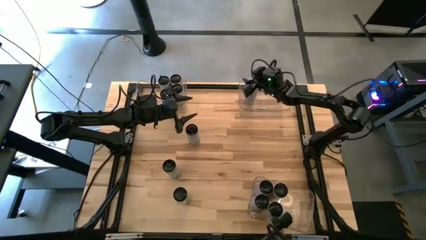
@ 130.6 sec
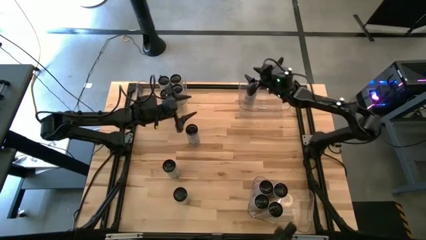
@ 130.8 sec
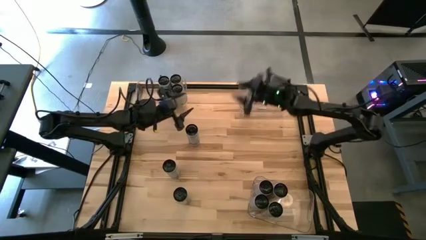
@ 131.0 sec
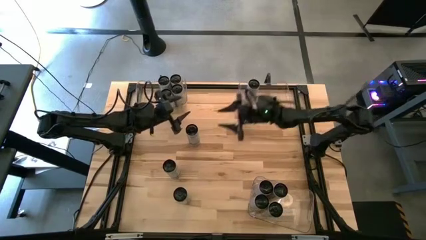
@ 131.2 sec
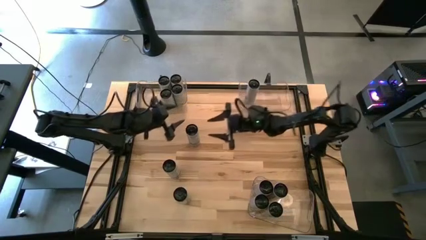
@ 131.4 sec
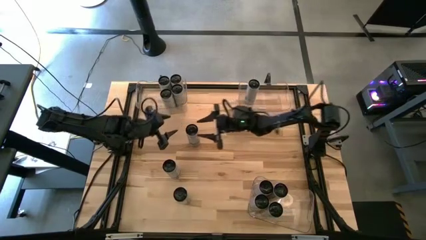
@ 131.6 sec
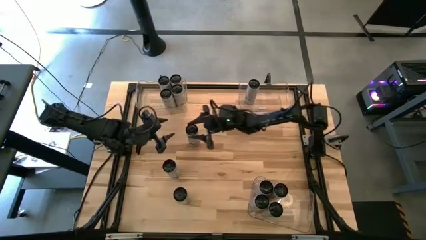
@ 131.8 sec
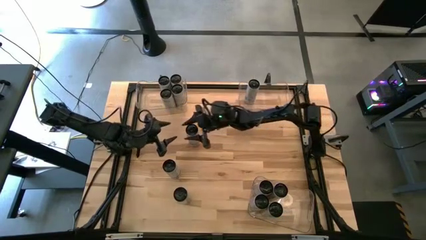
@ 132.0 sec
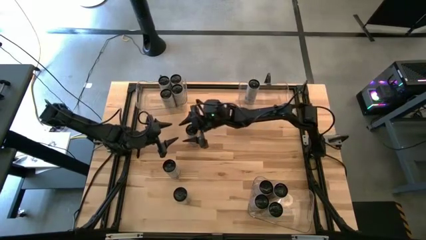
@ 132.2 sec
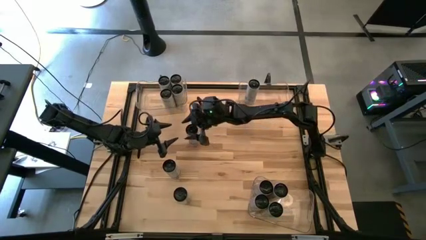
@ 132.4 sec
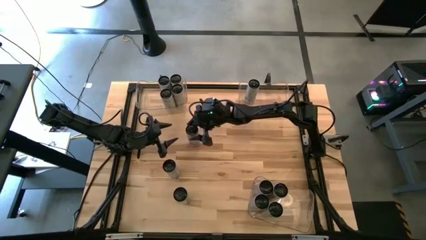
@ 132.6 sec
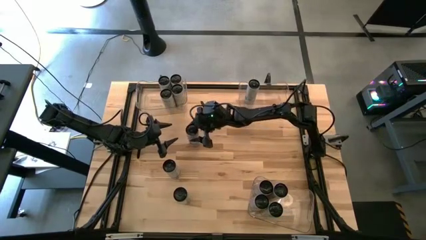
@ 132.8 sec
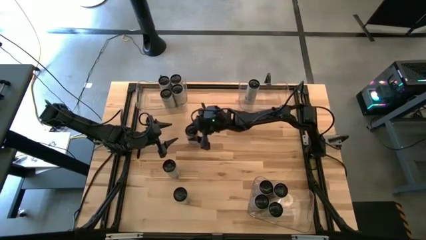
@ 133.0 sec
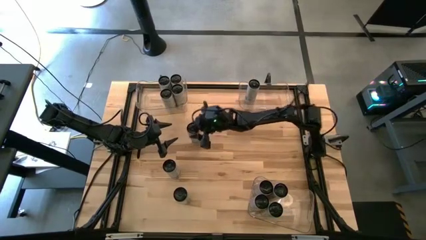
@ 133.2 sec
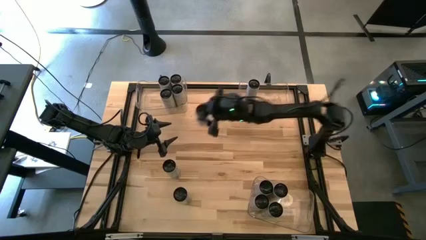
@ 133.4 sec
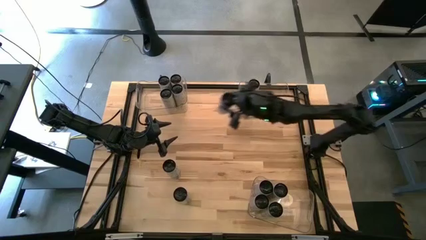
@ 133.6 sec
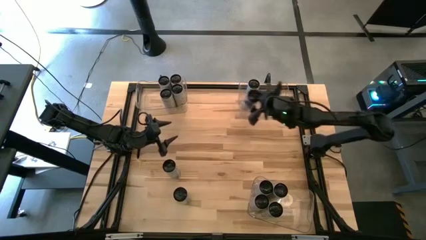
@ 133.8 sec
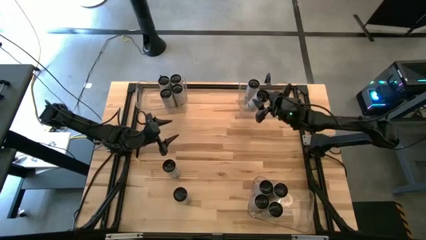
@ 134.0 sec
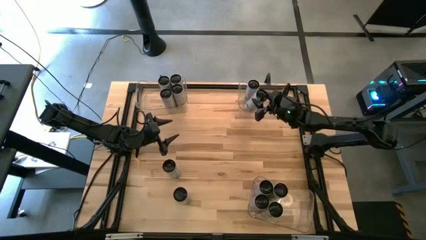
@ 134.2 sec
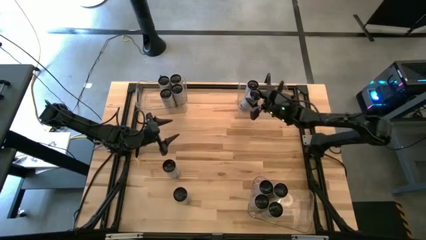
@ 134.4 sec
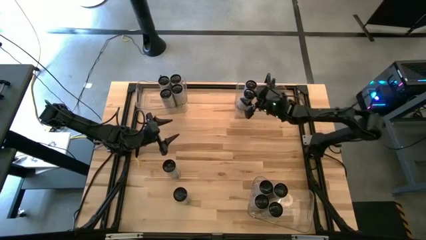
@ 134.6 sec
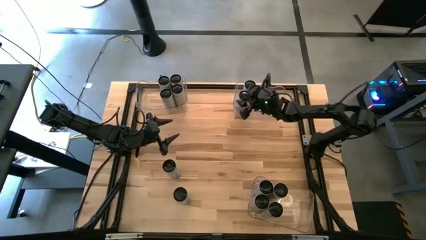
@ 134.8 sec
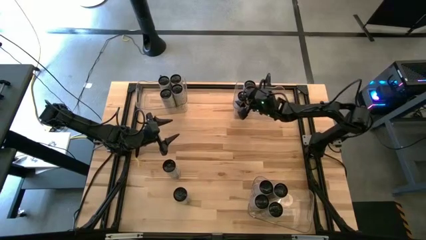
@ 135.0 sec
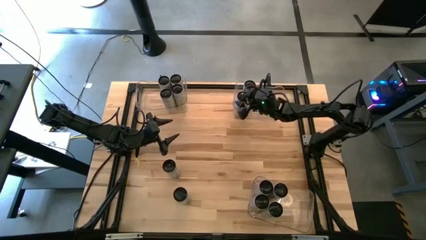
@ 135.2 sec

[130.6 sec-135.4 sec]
Task: Sort soda cans
Put the white-blue soda can into the top right transparent bin

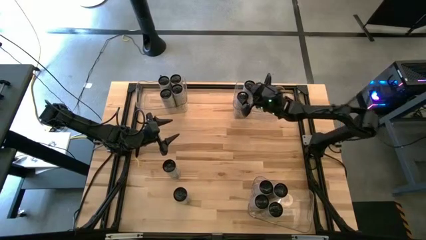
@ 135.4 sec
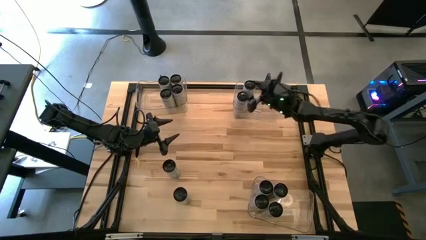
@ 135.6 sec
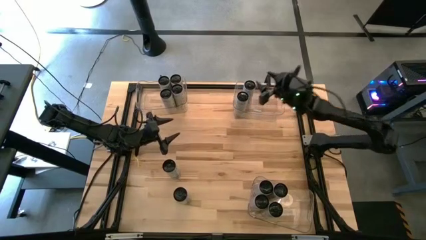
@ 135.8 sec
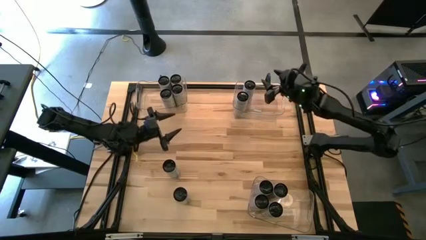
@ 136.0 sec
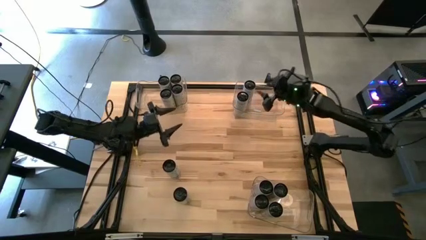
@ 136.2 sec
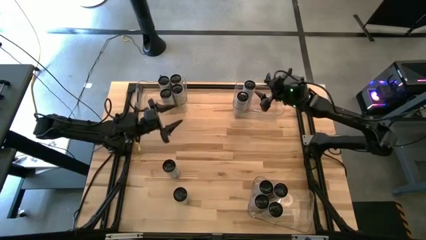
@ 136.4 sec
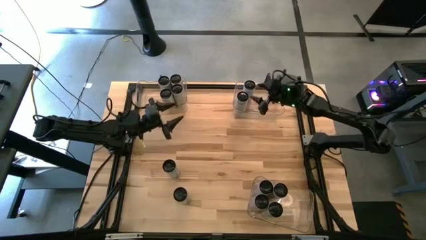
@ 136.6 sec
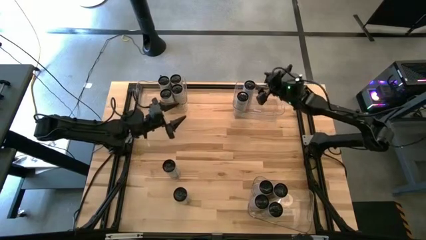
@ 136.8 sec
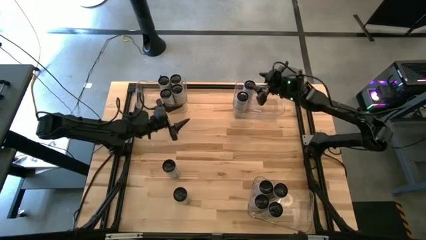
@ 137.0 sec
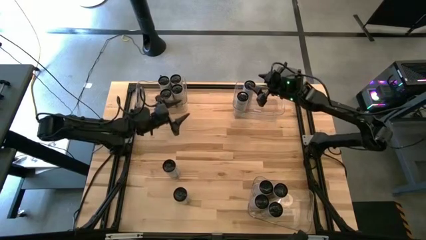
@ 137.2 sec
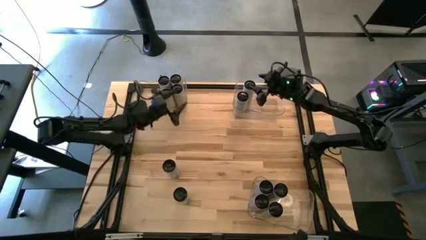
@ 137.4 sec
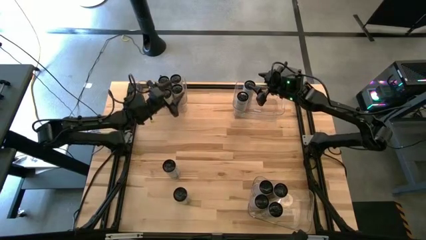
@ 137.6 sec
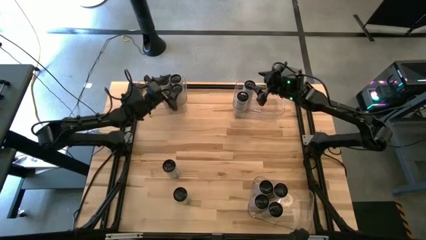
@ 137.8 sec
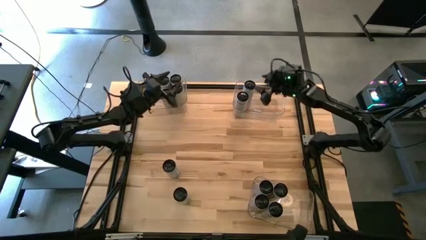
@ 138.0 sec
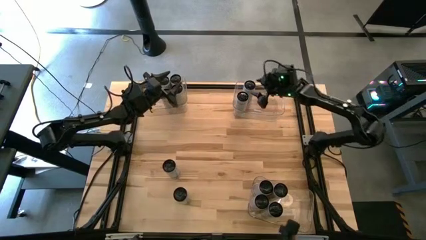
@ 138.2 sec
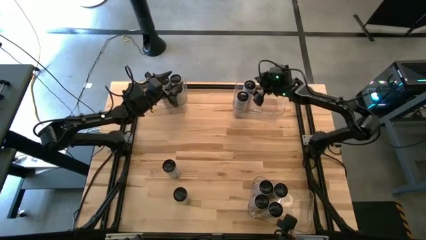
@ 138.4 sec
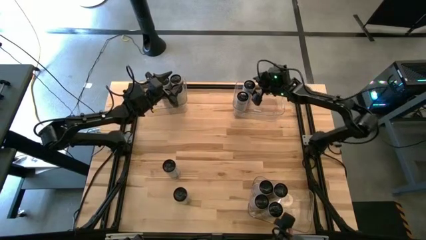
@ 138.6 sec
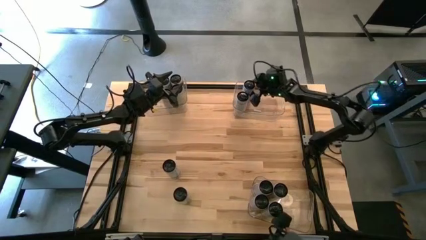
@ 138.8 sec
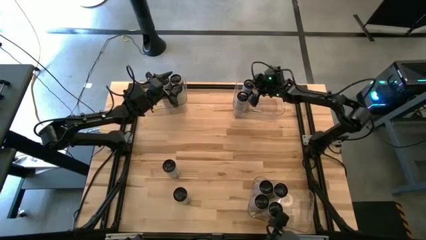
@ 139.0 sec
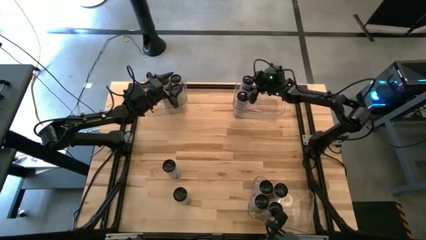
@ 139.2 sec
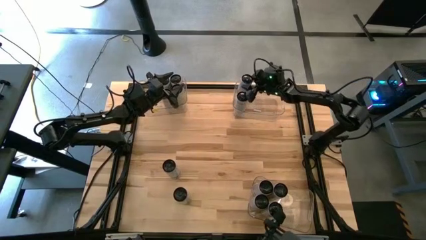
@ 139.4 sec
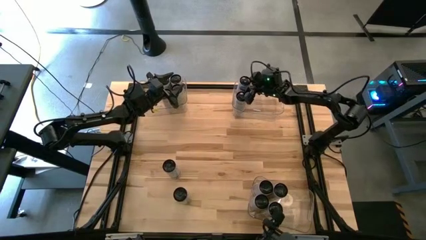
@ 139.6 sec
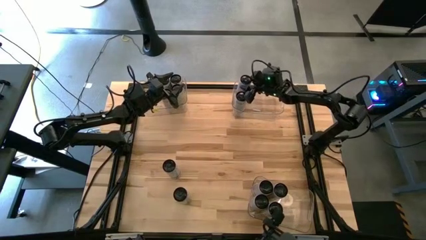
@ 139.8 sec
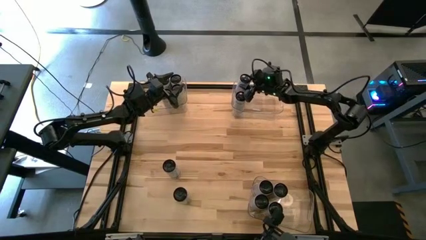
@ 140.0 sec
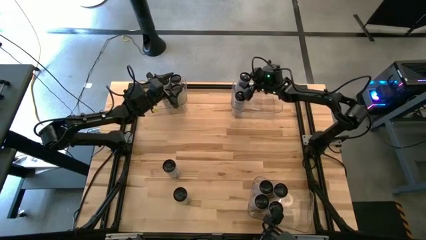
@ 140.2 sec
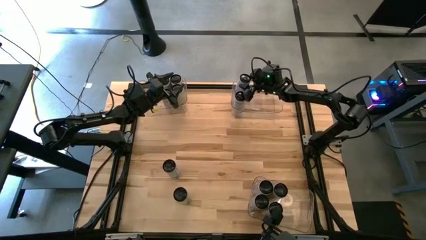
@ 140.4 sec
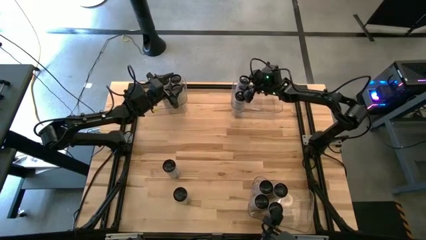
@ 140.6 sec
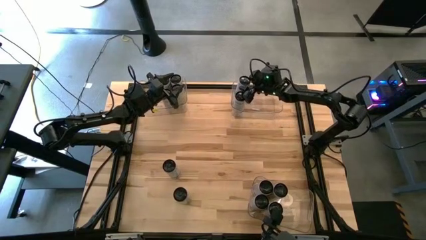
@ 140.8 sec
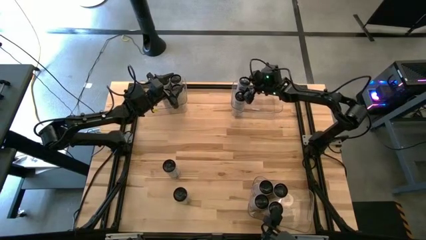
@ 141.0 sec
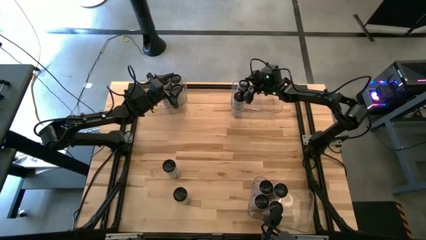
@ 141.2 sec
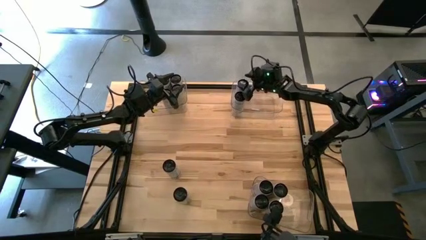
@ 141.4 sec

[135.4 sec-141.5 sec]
Adjust the white-blue soda can into the top right transparent bin

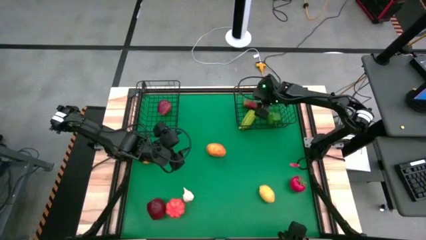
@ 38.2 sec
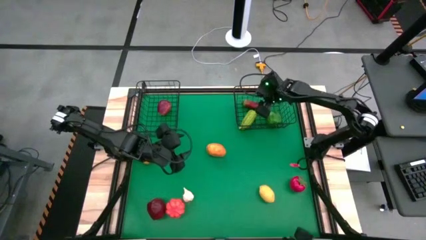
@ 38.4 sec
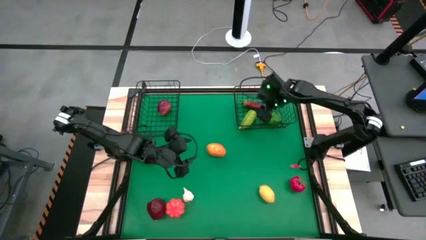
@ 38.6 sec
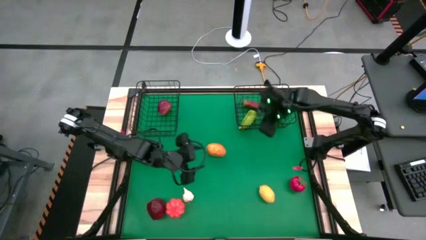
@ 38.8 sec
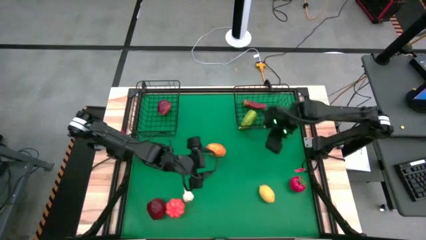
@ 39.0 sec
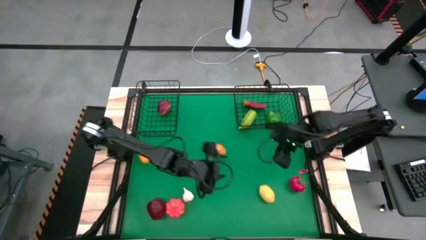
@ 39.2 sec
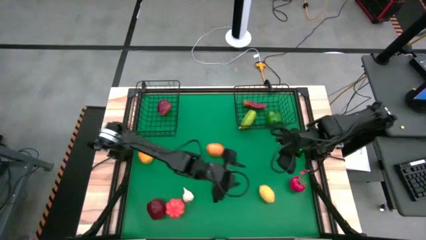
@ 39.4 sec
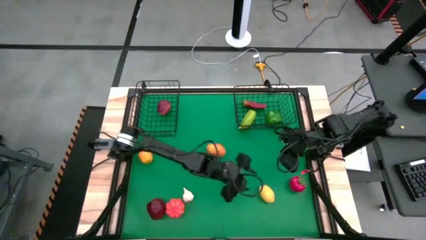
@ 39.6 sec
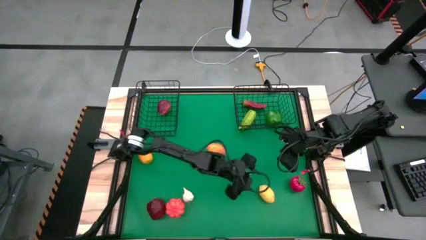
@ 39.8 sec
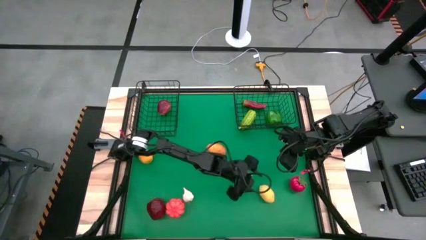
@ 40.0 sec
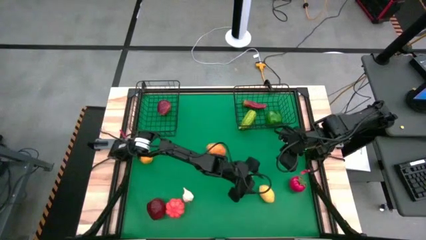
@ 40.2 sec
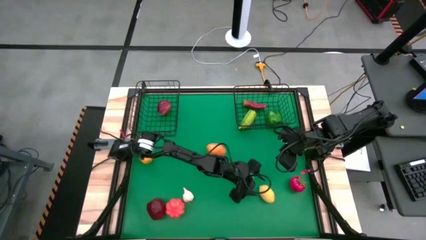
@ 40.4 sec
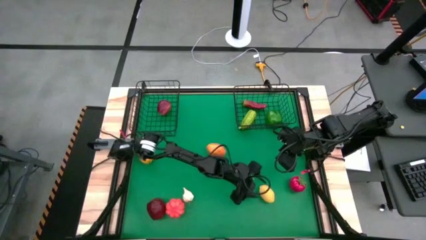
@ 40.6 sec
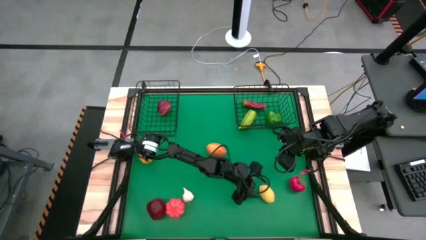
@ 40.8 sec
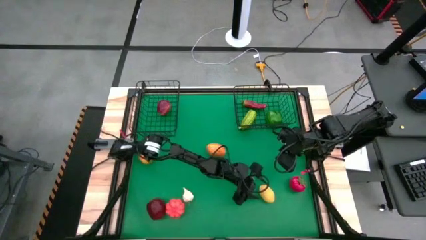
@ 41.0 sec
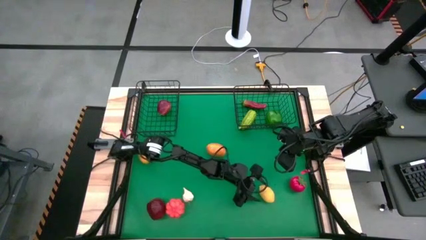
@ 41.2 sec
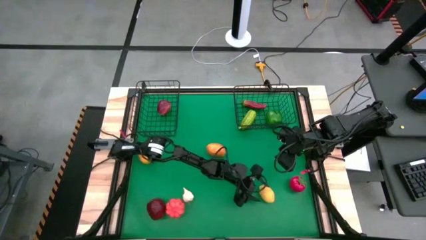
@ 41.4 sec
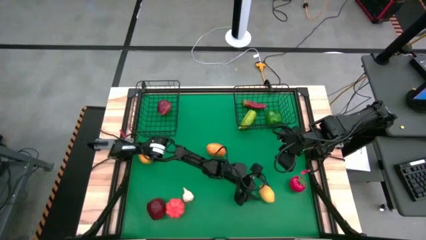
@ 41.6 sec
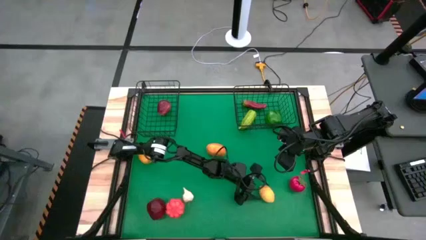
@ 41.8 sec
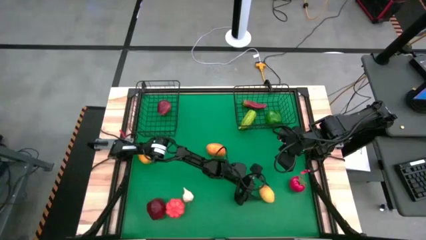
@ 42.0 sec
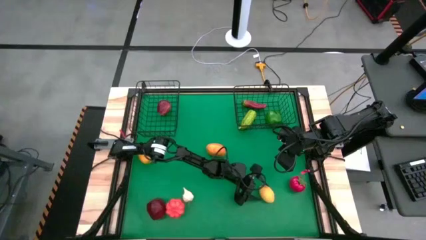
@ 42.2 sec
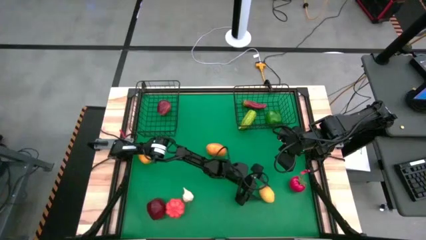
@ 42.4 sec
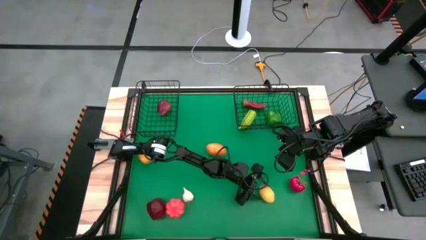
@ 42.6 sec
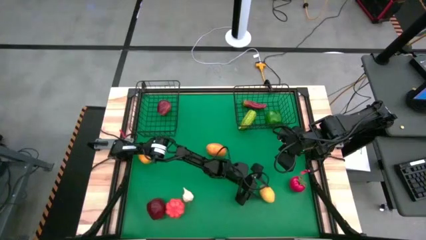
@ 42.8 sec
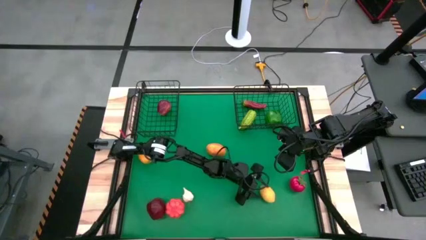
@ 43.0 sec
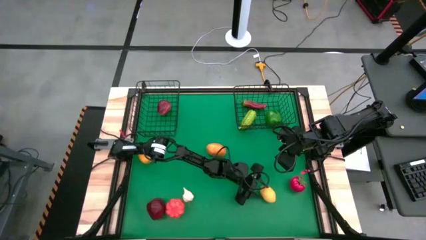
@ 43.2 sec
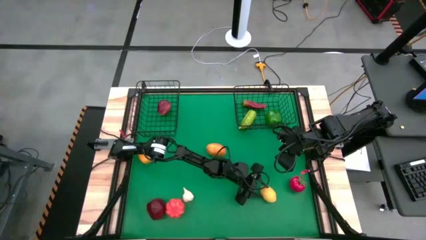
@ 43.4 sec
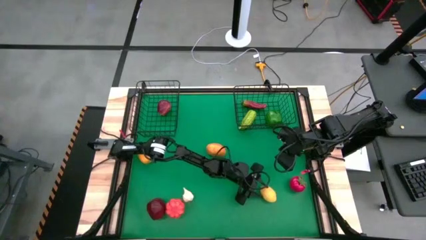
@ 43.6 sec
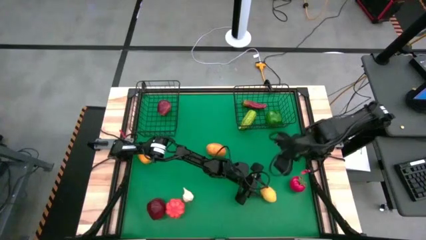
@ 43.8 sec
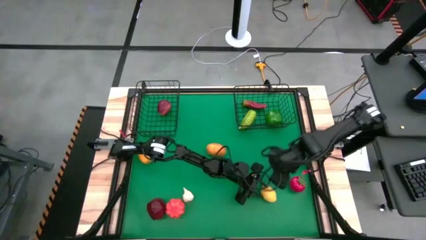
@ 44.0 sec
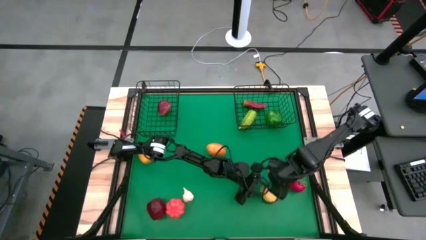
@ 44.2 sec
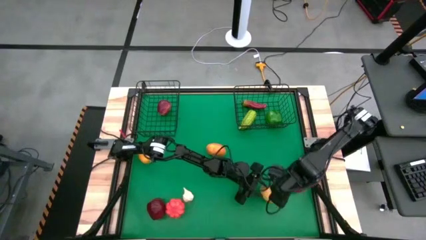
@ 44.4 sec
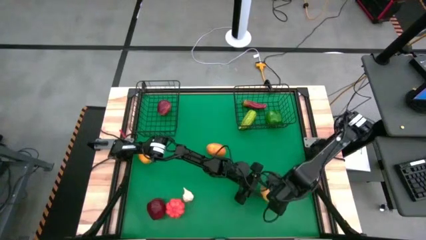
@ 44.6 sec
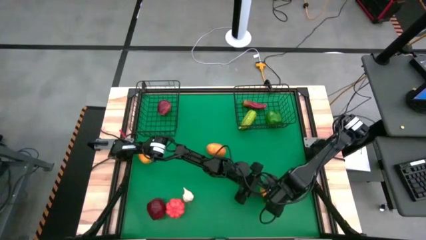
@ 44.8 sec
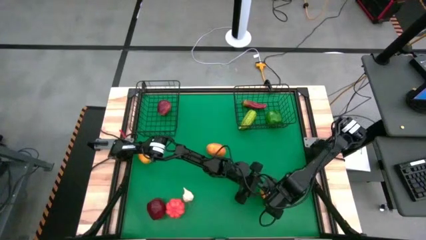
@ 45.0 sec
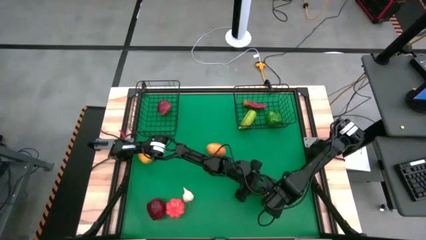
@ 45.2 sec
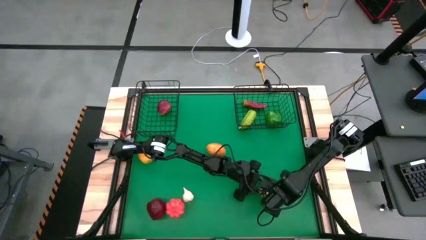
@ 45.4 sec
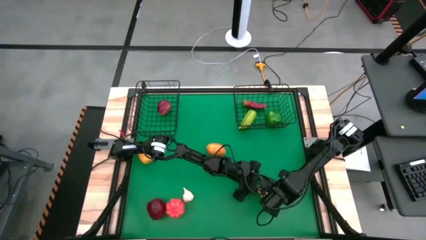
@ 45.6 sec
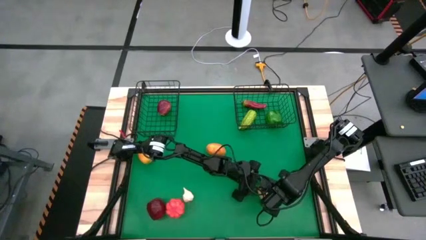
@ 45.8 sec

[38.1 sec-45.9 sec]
Task: Sort produce into baskets
Put the right yellow lemon into the left wire basket
